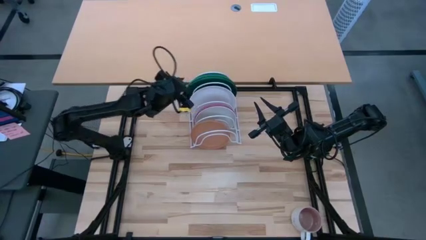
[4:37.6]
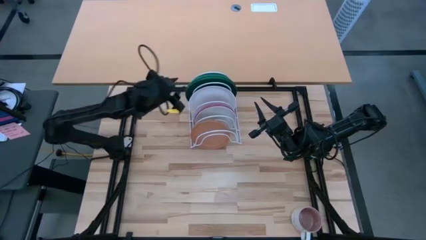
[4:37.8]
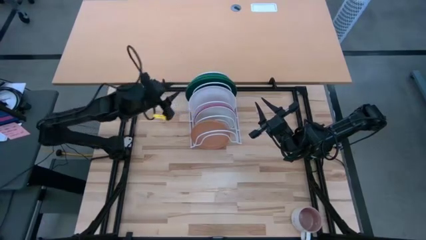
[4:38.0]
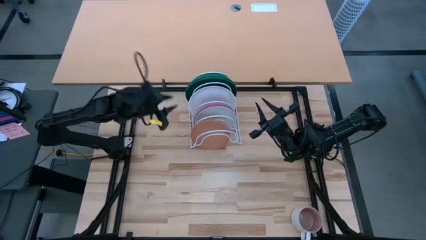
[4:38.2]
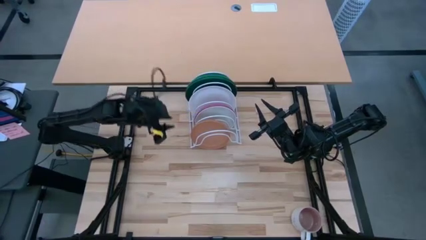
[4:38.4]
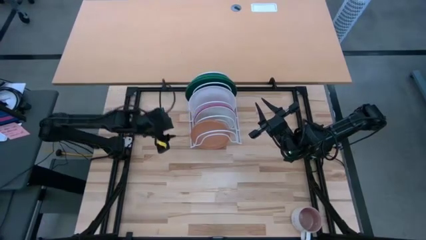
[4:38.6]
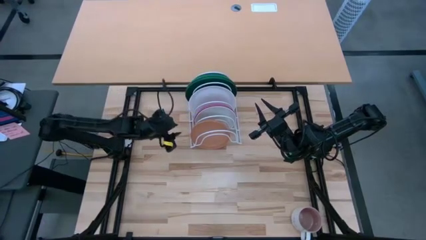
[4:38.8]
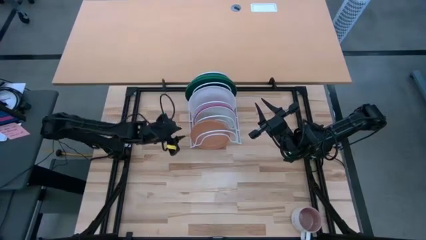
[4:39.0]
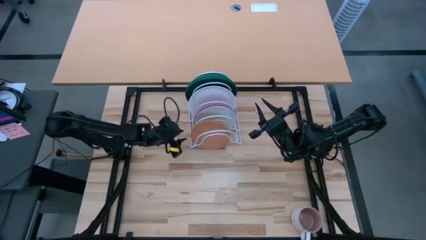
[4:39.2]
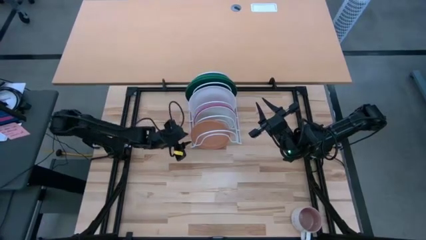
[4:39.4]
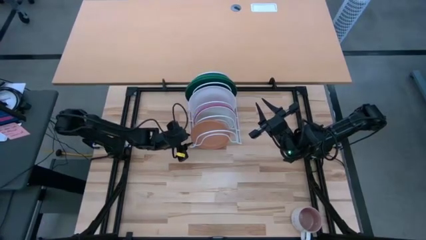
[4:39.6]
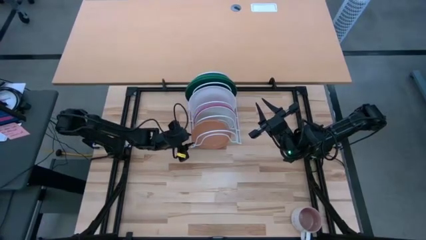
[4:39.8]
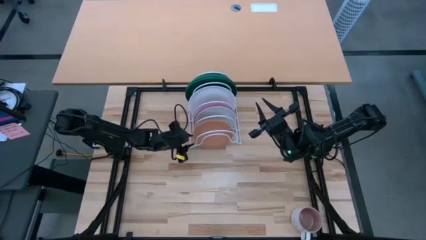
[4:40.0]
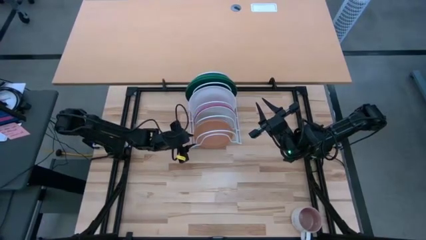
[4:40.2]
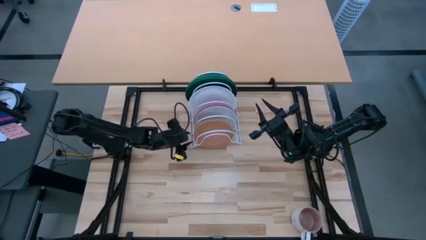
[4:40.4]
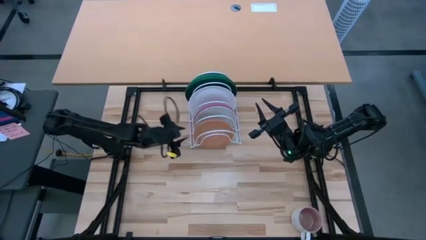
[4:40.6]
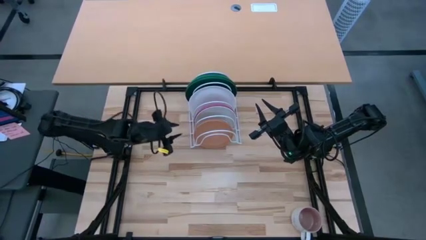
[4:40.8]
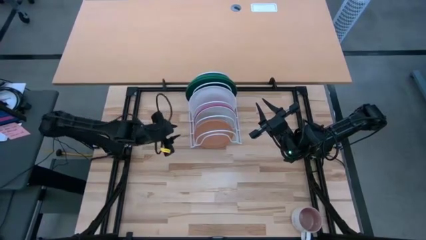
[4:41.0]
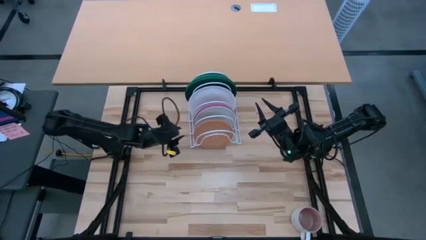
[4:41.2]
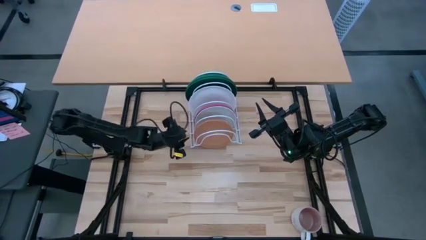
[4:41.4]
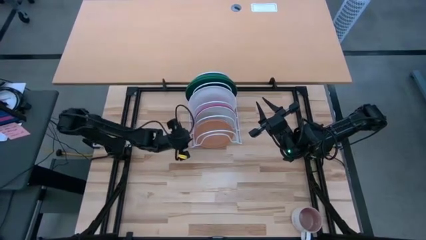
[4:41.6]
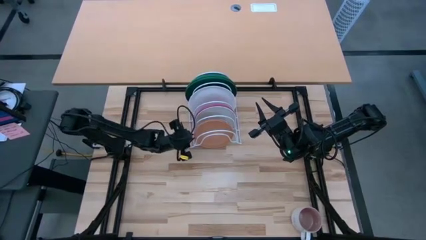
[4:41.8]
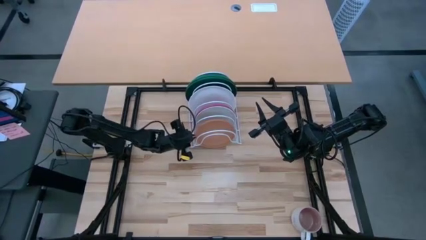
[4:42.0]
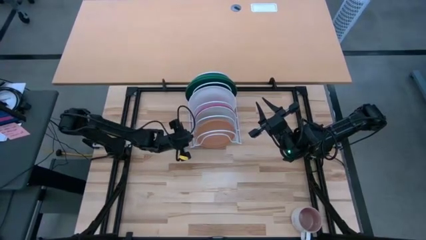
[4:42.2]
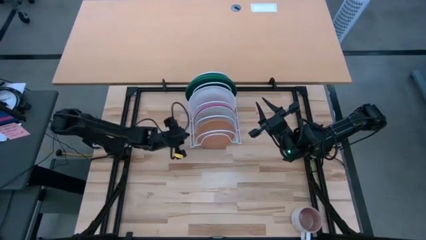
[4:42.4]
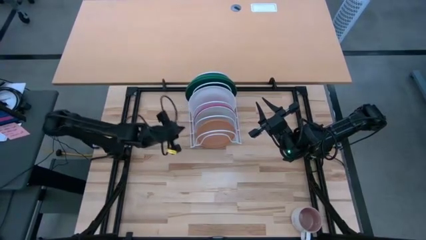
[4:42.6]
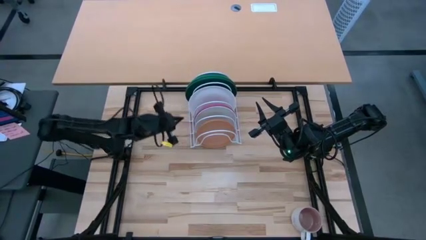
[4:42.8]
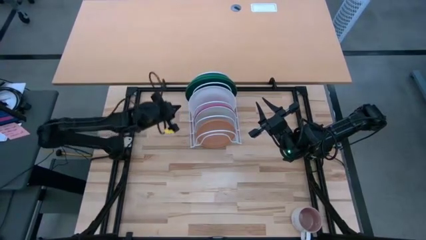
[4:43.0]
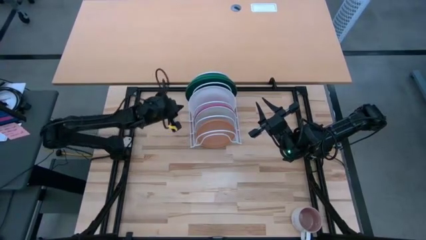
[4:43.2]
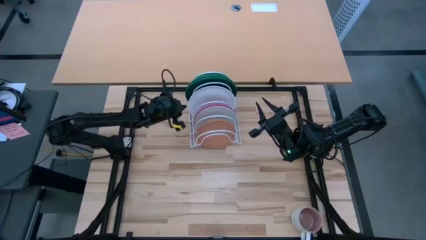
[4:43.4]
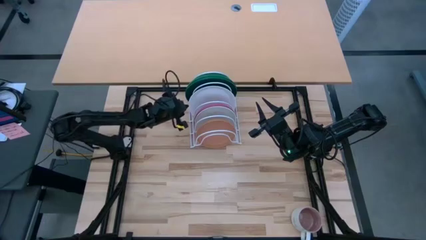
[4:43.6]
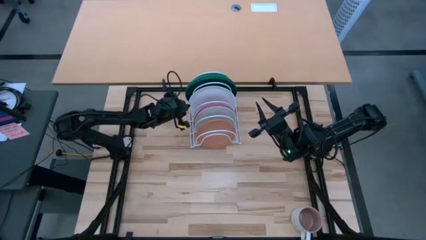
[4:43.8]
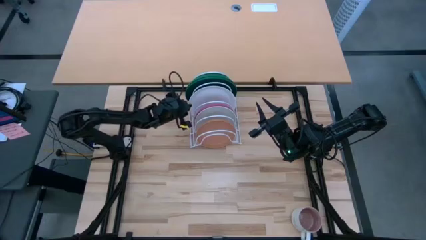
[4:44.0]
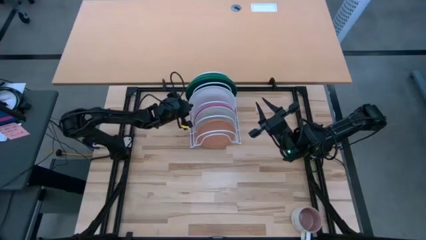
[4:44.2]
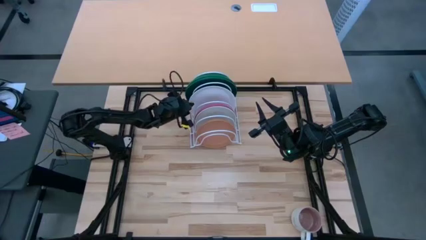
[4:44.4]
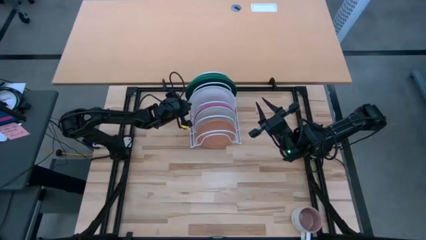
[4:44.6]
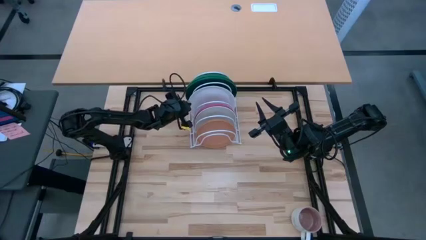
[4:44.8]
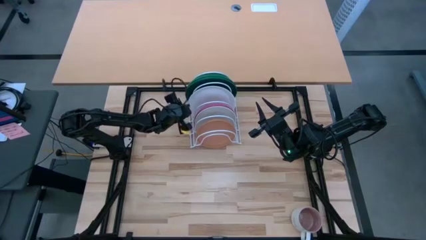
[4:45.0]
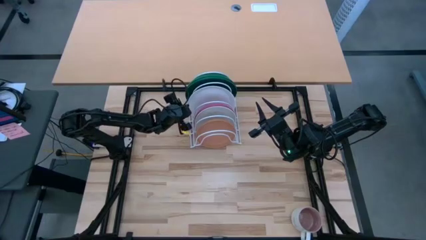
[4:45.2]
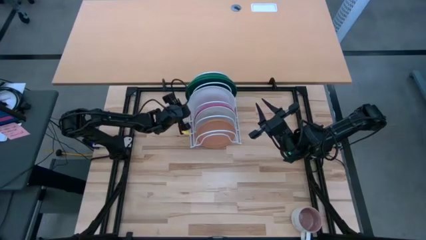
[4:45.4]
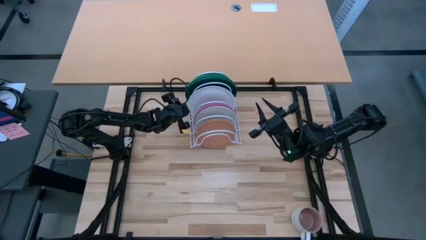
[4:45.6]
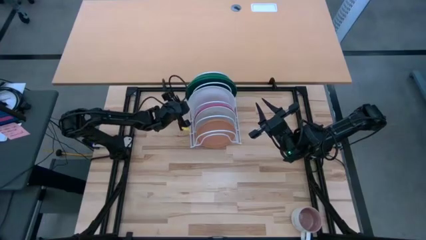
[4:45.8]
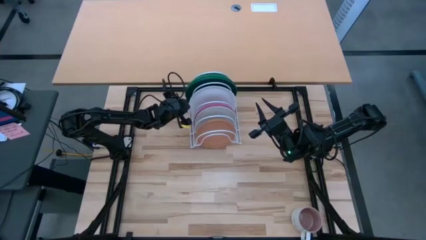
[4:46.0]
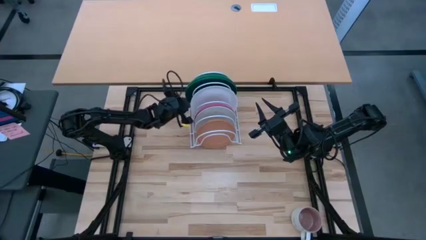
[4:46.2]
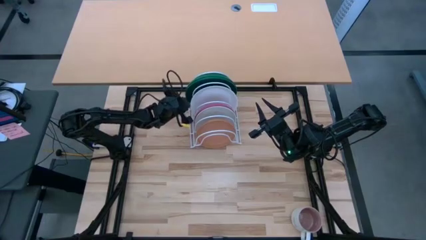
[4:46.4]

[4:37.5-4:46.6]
Task: Sort dishes
Adjust the plates

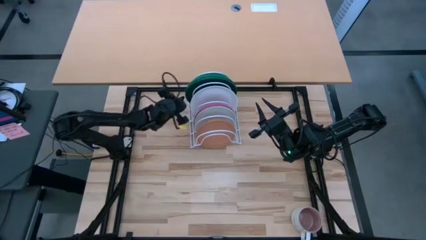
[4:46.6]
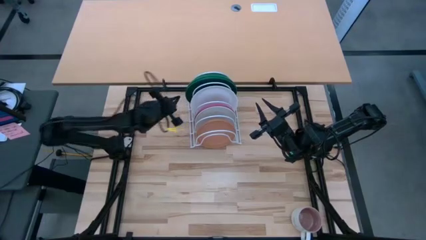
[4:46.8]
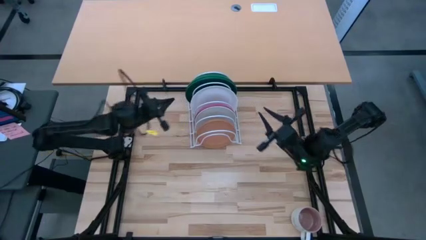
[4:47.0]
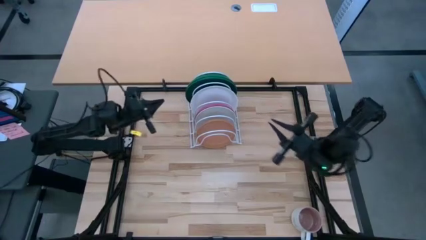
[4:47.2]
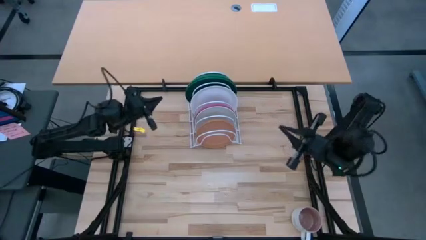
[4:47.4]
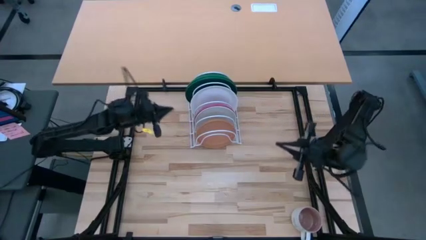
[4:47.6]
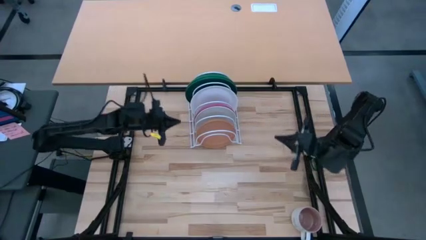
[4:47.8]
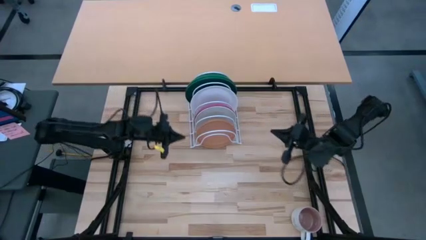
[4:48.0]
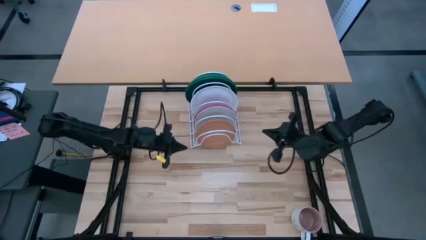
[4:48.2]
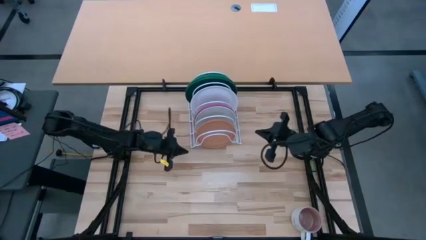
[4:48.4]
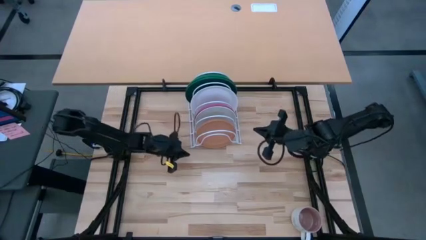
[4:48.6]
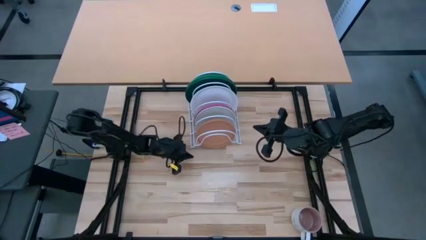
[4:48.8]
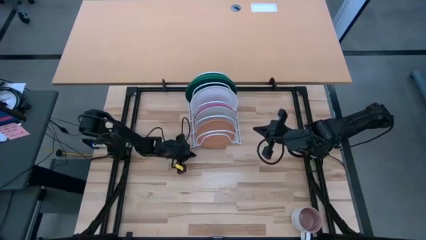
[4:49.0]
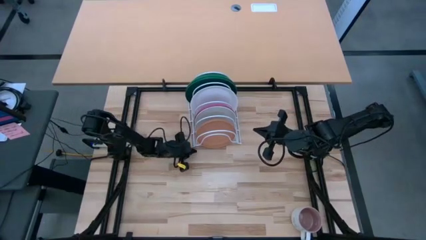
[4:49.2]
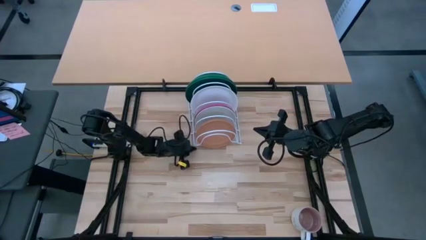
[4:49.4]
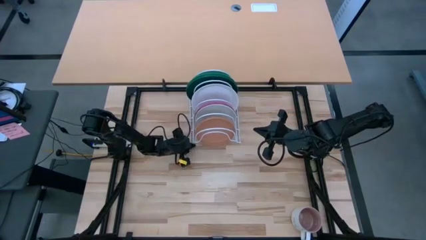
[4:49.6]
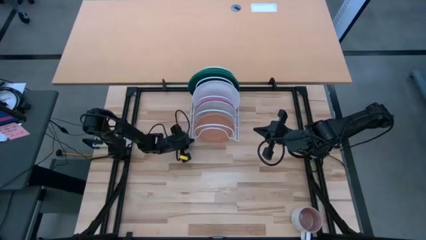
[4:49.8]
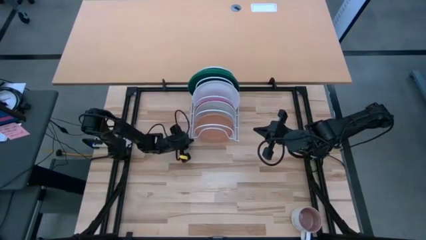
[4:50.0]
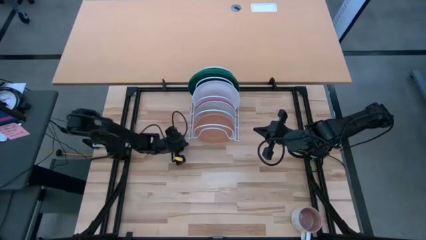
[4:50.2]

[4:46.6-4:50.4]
Adjust the dish rack

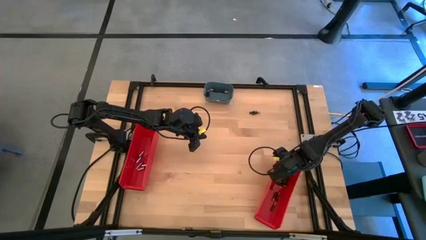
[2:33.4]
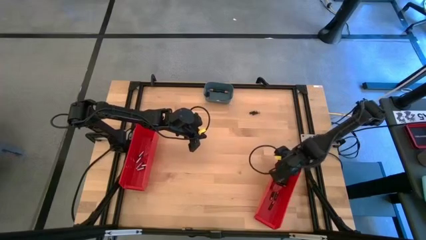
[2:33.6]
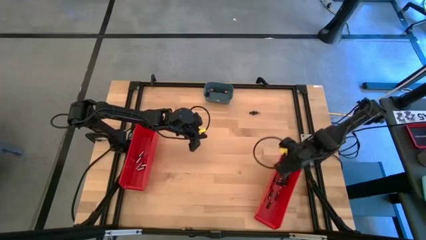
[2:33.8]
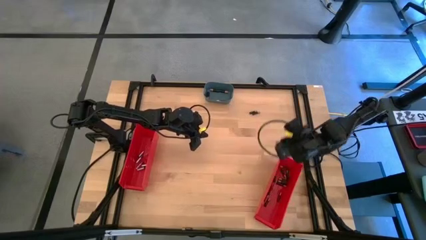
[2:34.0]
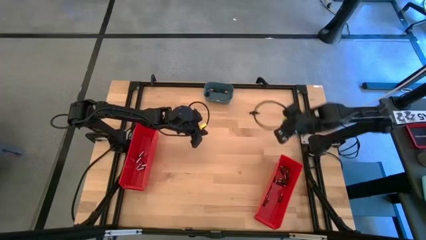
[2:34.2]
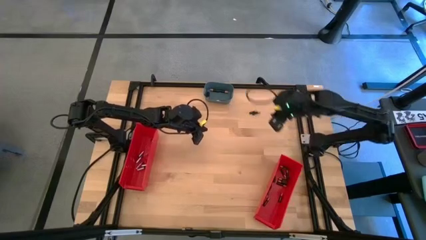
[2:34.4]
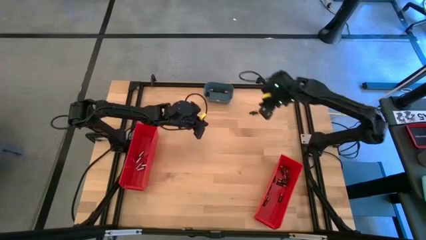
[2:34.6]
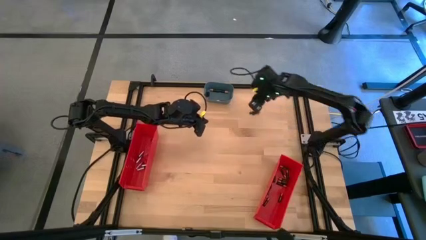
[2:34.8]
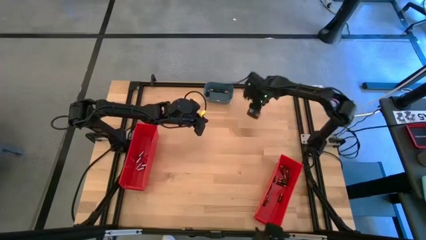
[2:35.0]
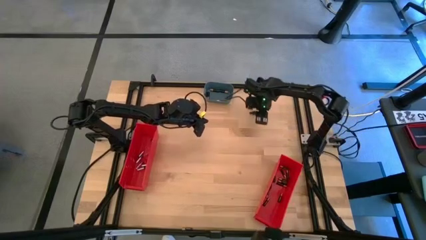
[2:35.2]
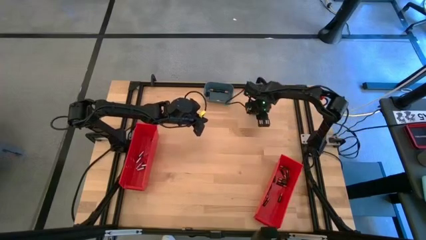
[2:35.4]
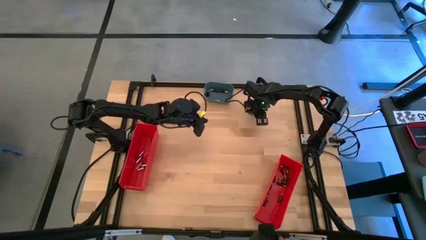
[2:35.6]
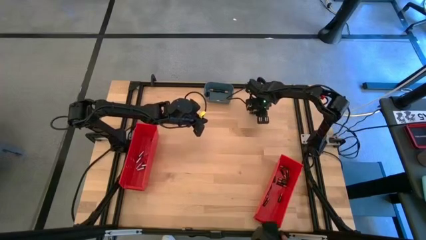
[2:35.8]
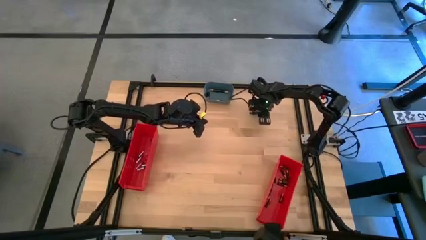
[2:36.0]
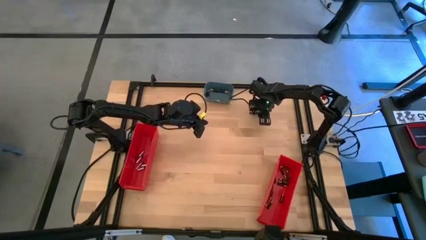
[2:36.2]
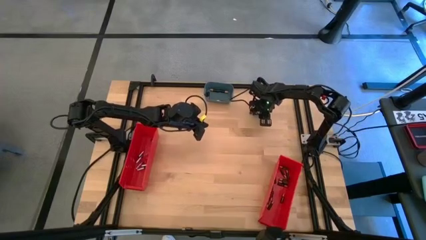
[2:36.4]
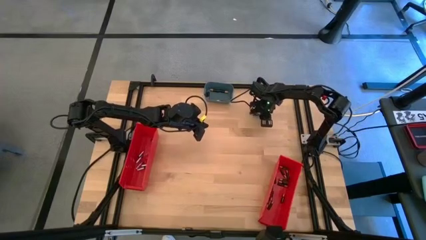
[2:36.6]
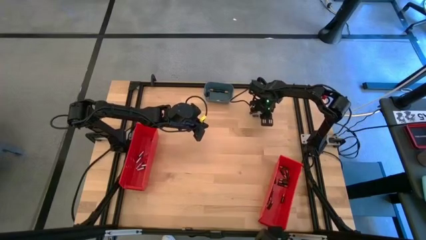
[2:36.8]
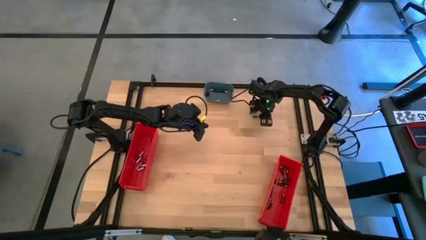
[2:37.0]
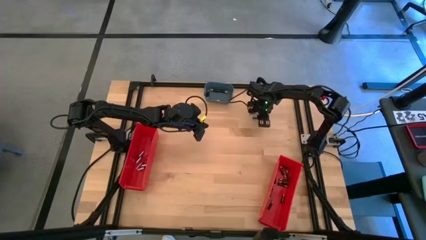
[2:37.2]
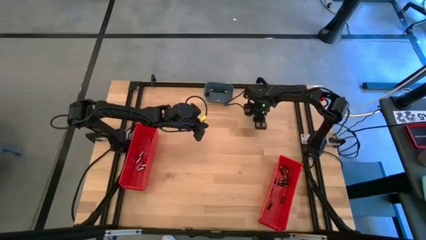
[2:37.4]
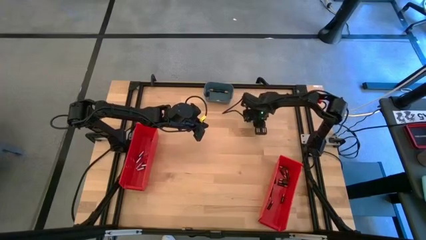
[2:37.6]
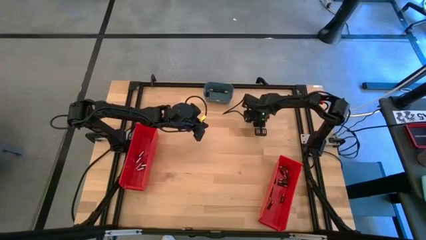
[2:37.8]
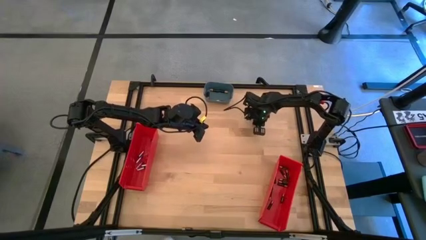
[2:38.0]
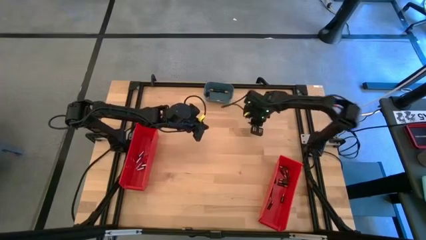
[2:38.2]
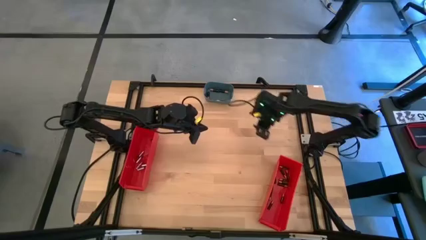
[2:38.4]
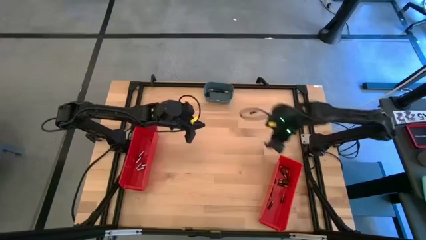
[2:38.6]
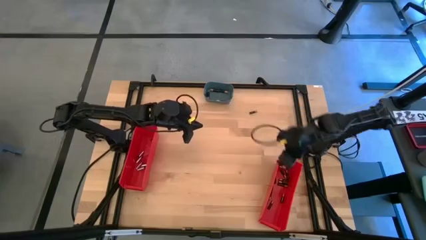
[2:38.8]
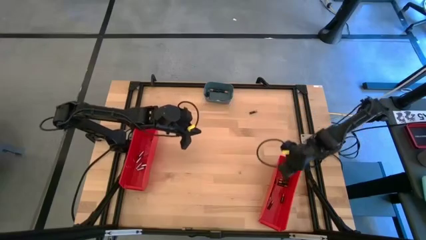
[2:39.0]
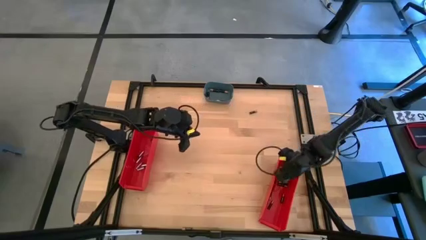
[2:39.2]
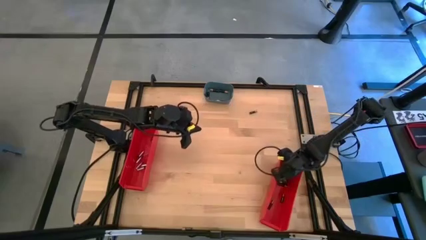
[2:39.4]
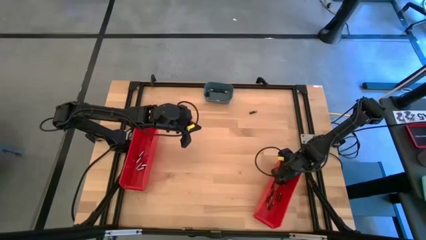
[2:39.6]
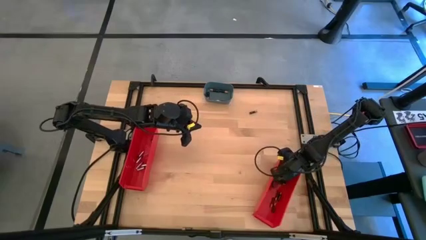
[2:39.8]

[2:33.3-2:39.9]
Task: Sort batteries
Put the small brown battery into the right red bin
